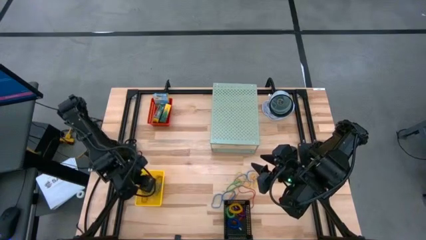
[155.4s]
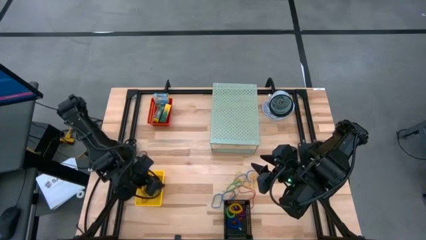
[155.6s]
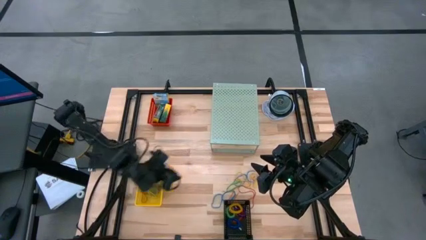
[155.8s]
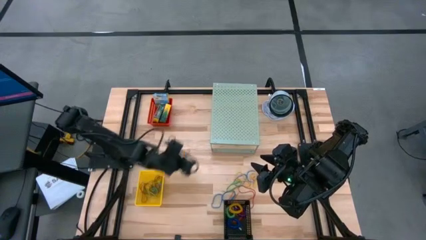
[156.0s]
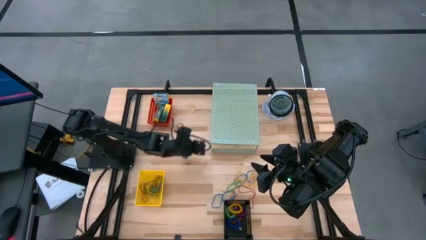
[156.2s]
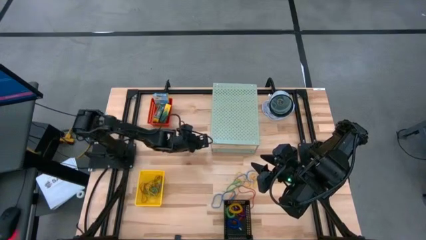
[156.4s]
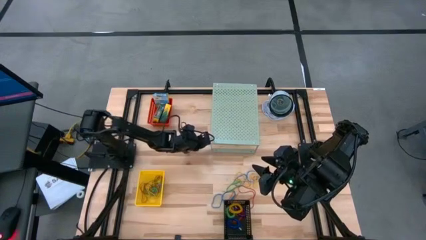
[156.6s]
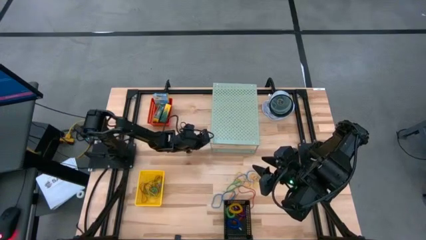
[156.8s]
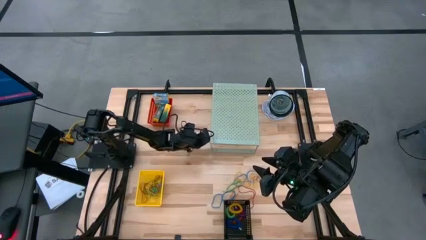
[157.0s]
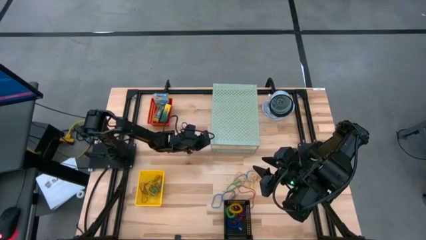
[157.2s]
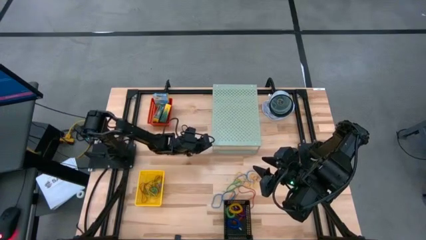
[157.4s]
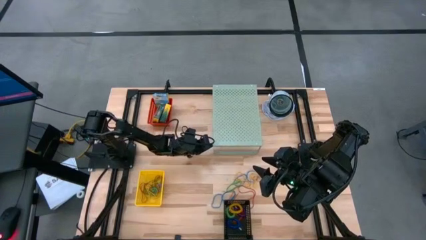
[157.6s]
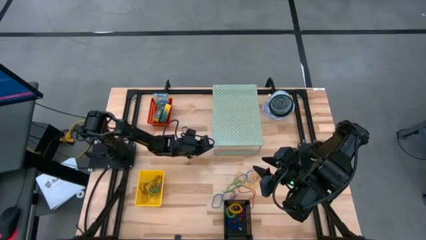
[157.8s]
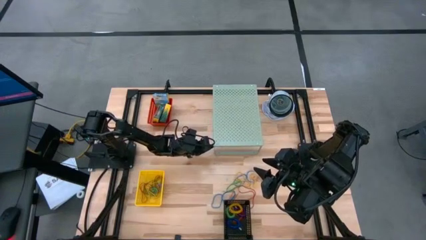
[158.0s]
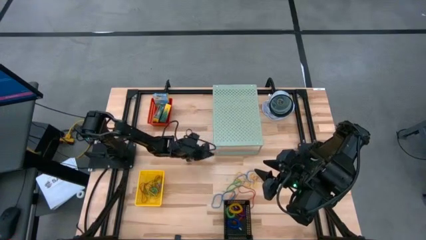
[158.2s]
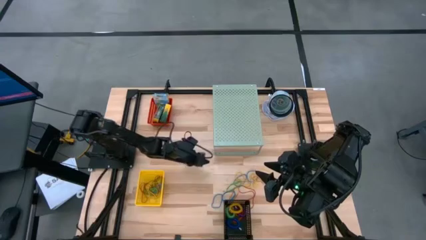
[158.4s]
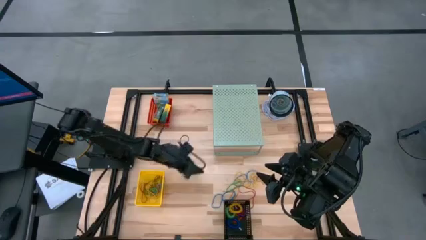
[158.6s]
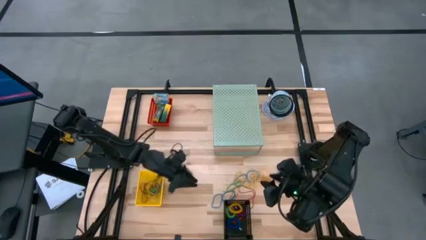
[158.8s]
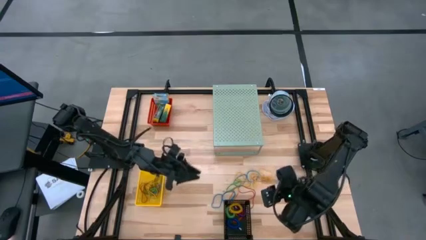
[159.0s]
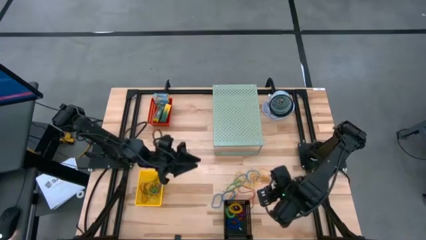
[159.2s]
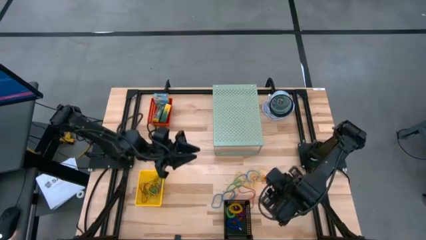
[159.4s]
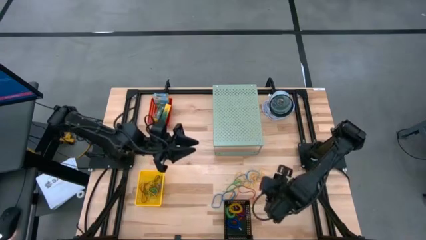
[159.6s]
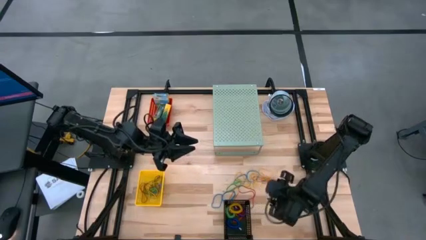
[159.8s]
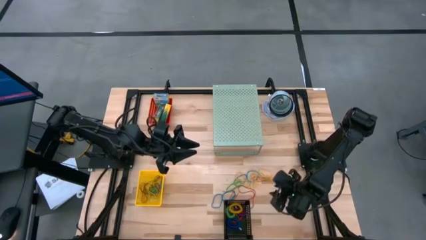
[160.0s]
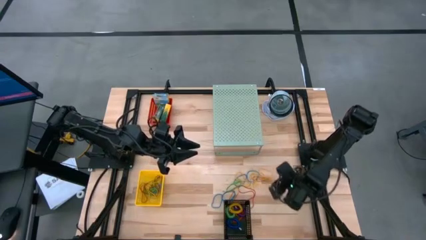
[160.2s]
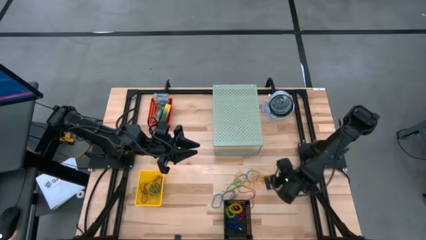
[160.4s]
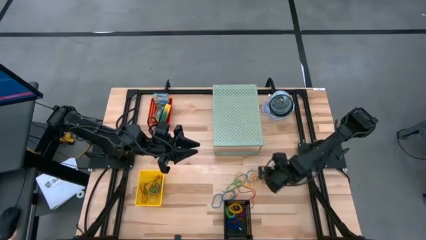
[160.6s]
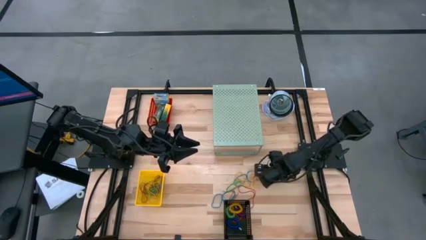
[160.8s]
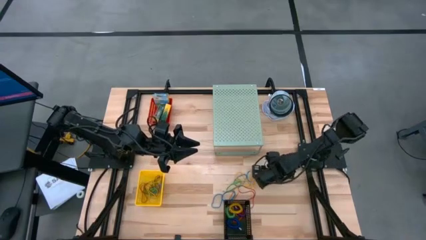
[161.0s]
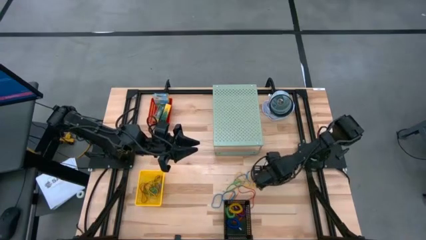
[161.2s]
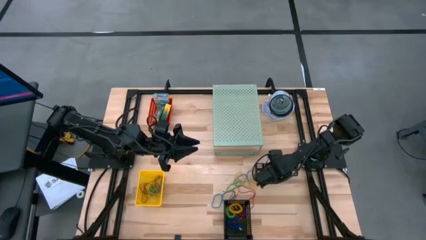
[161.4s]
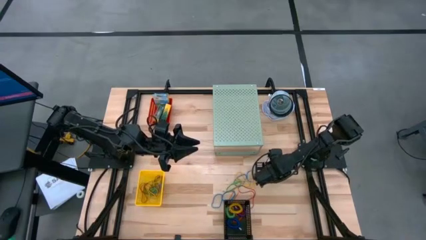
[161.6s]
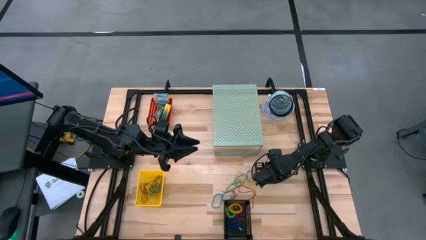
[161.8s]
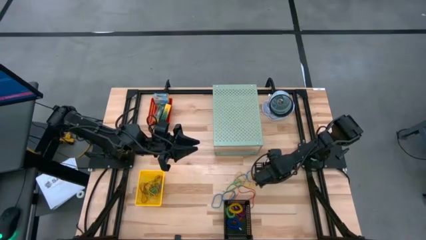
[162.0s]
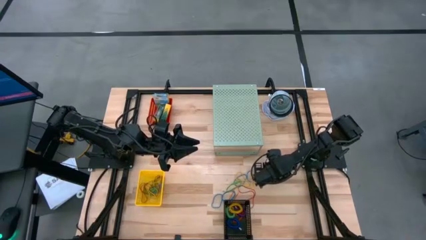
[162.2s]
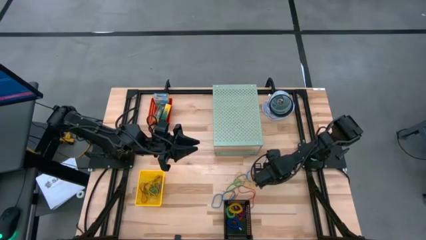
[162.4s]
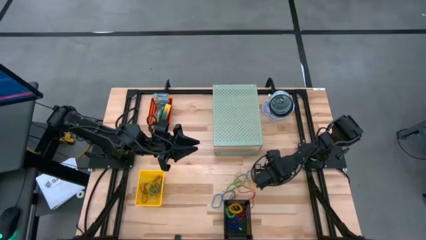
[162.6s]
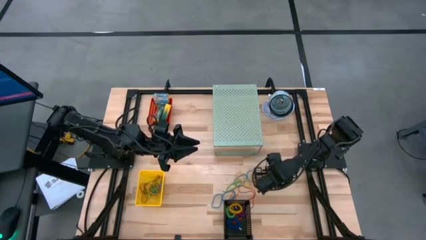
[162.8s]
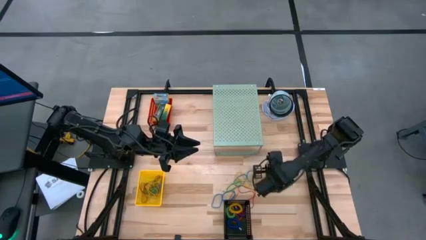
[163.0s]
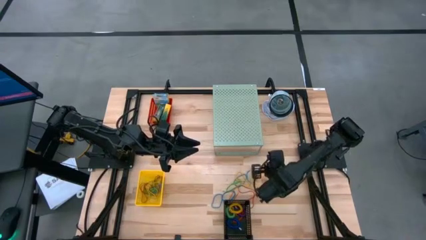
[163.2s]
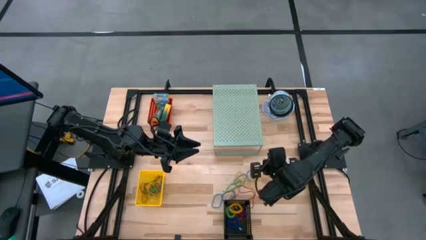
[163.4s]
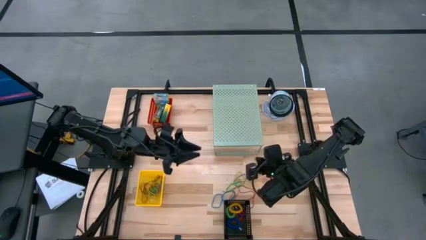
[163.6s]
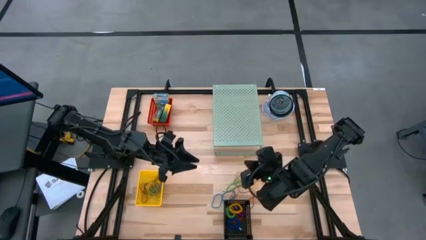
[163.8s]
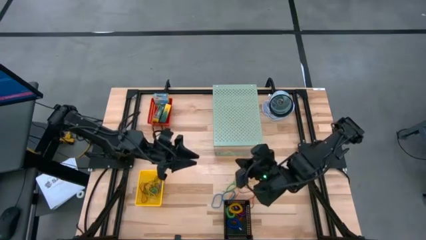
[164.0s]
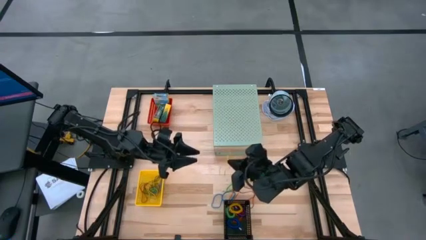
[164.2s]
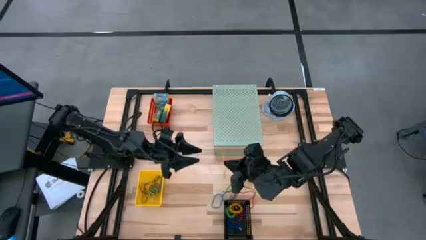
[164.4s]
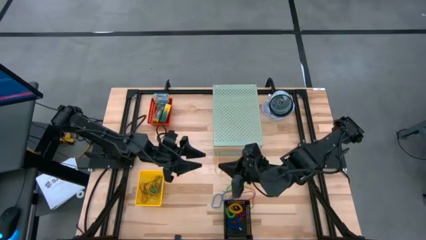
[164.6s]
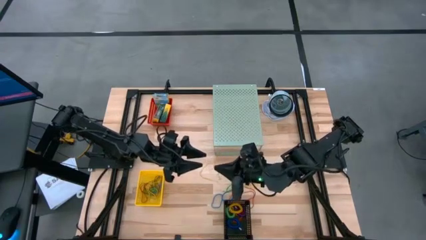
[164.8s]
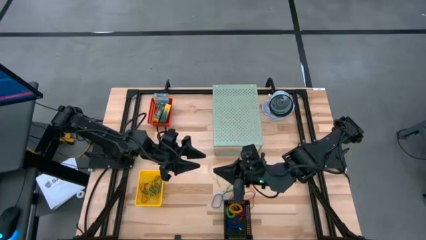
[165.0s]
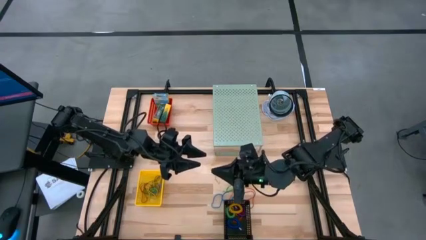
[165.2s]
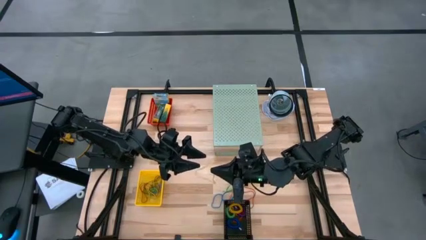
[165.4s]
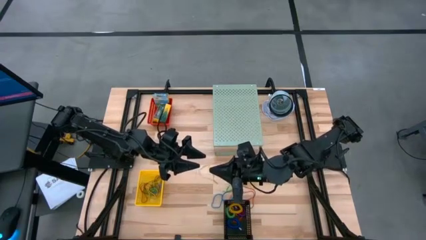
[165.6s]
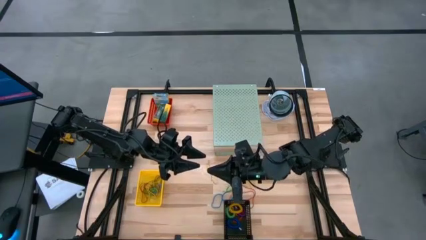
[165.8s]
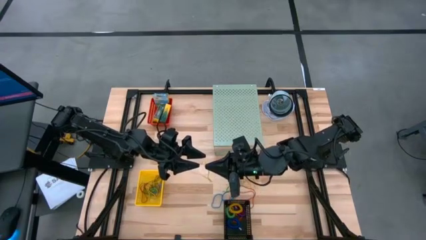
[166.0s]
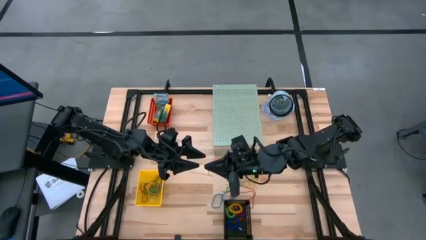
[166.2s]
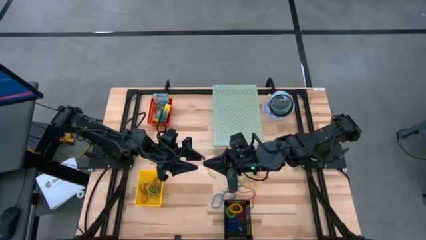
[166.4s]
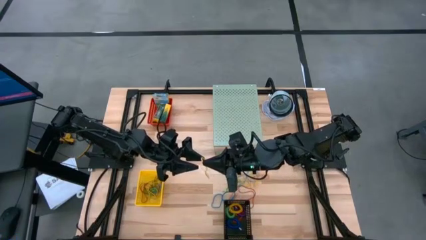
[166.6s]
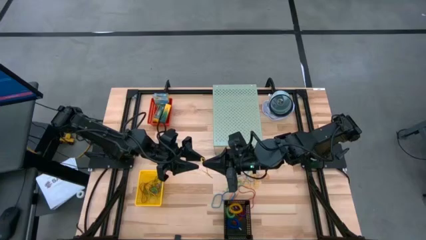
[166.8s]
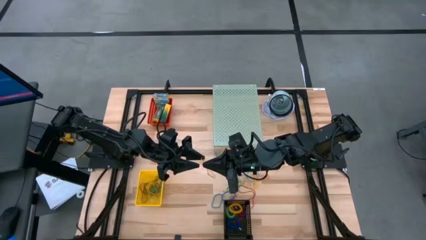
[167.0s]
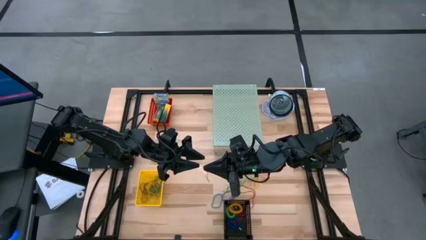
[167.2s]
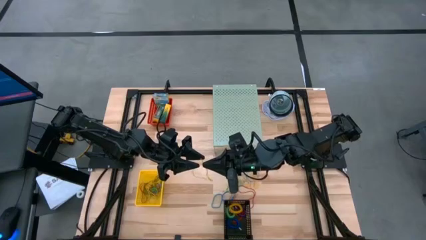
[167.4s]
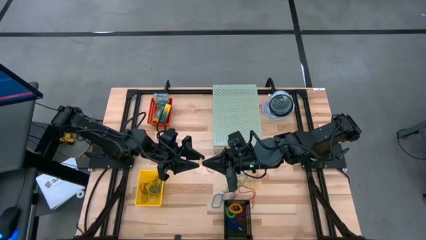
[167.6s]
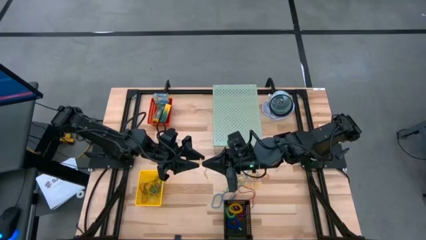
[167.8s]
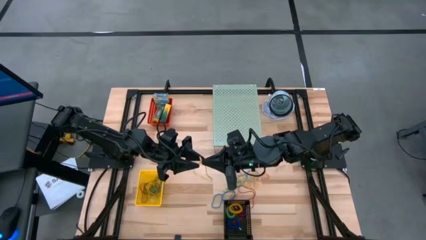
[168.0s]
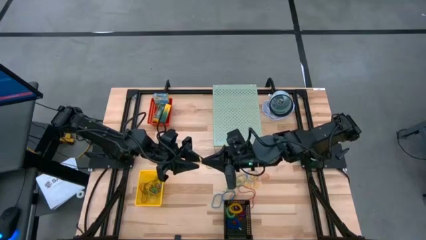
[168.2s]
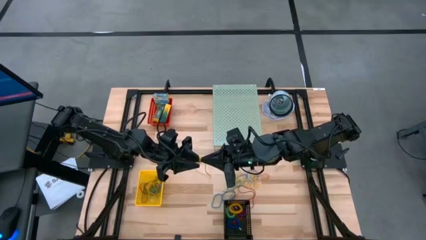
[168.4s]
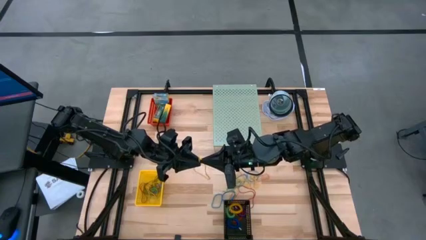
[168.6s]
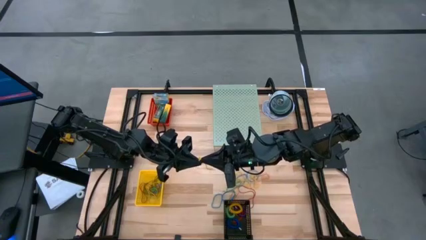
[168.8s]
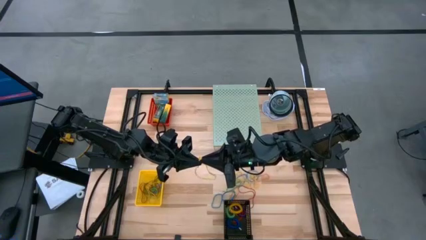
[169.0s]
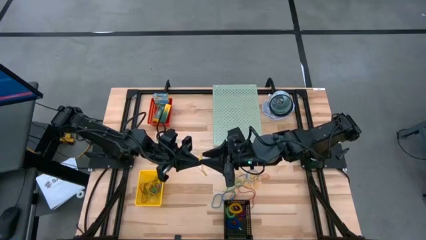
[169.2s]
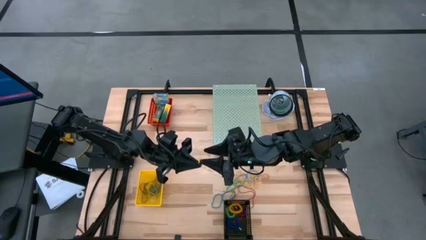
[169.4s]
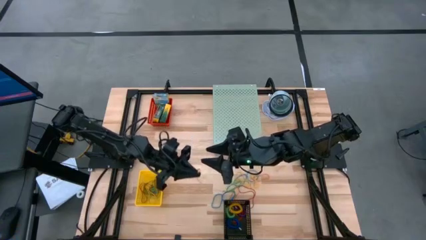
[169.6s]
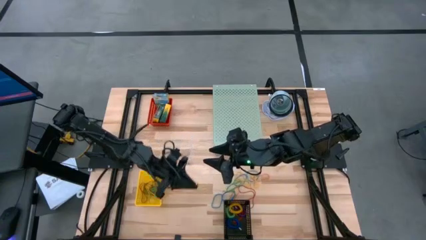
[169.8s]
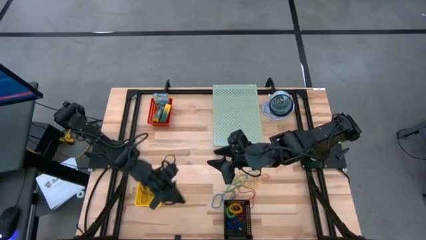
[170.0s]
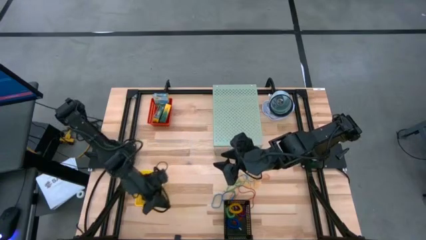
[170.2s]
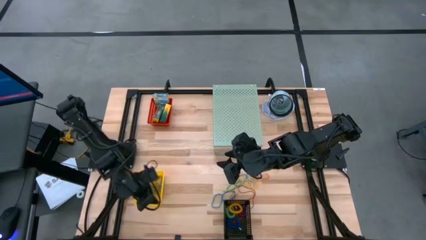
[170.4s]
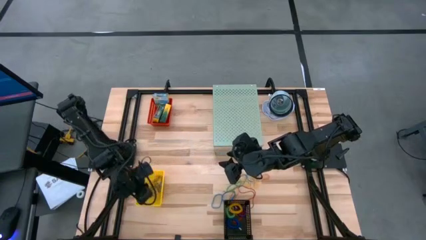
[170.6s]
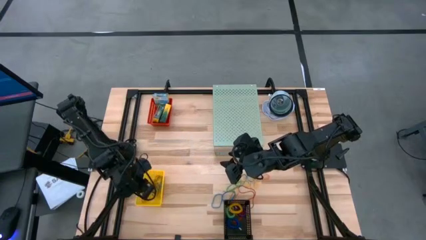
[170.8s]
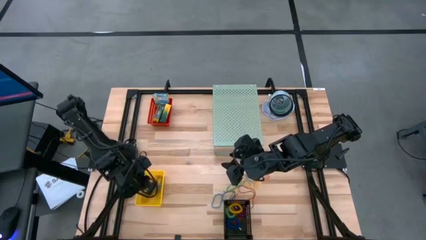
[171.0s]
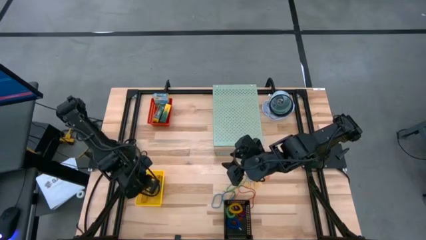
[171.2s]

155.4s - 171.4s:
Task: Pick & Place Office Desk Supplies
Put the yellow rubber band into the yellow bin
